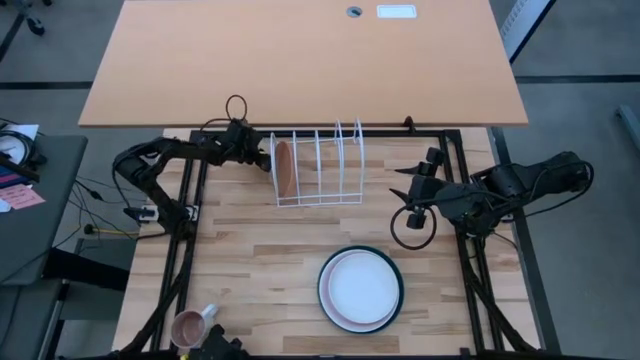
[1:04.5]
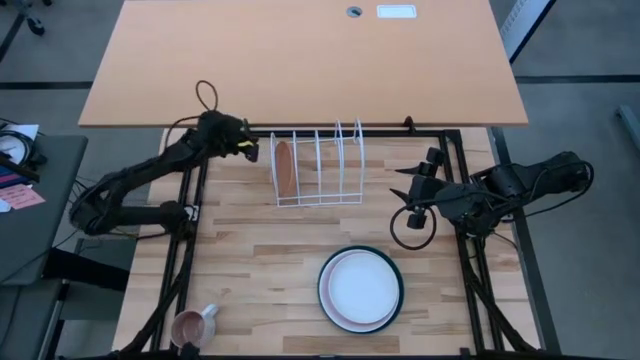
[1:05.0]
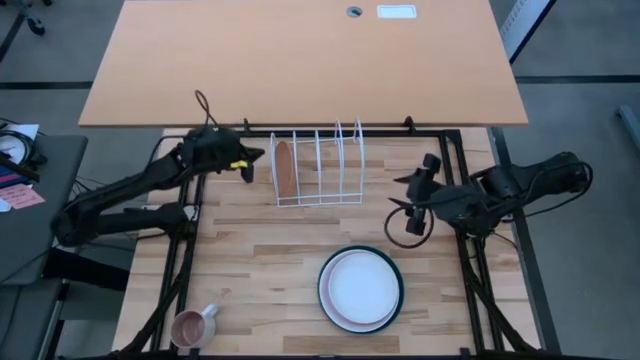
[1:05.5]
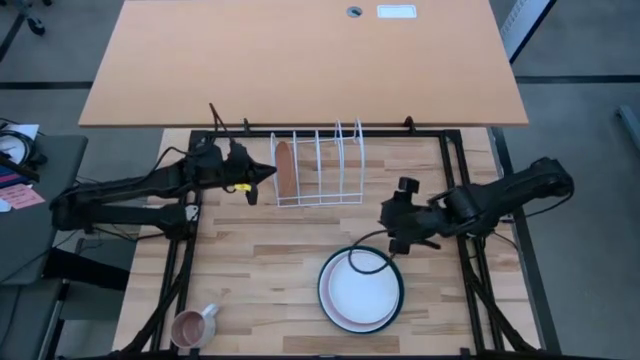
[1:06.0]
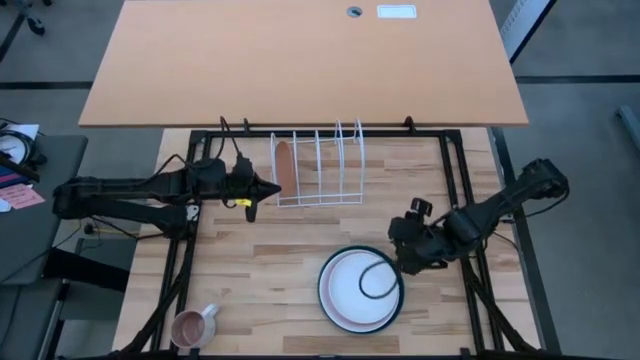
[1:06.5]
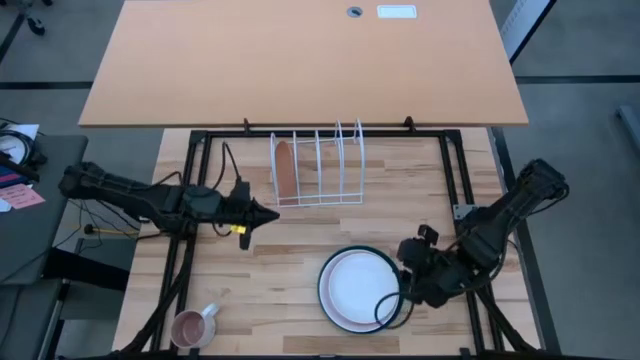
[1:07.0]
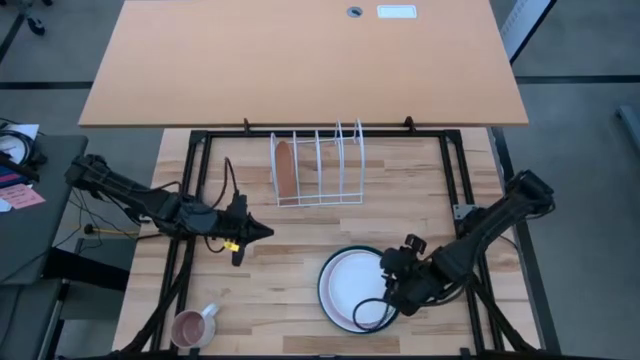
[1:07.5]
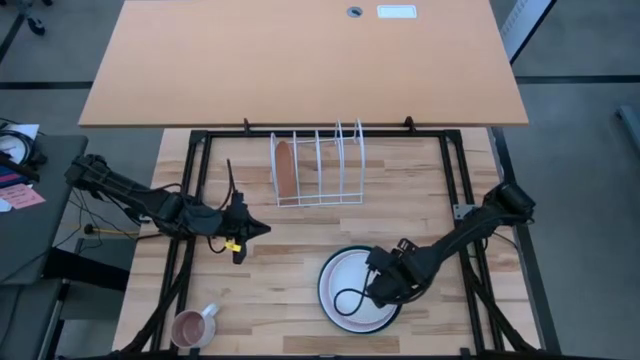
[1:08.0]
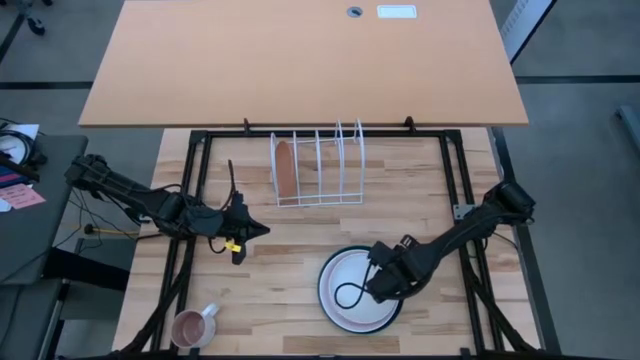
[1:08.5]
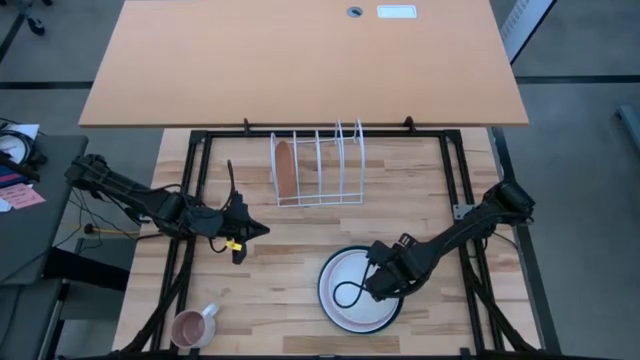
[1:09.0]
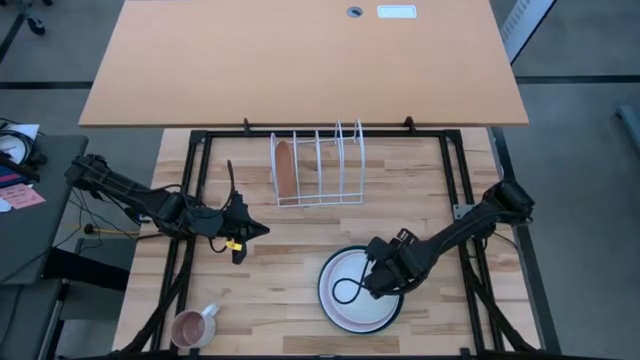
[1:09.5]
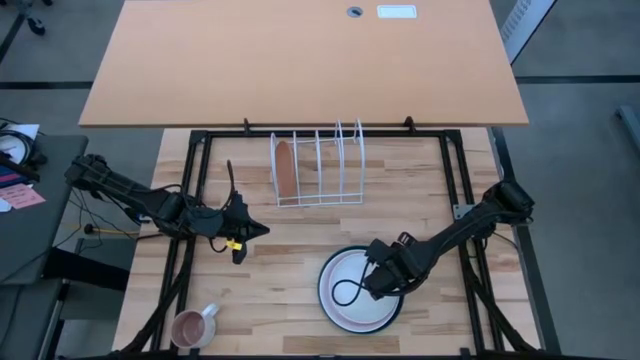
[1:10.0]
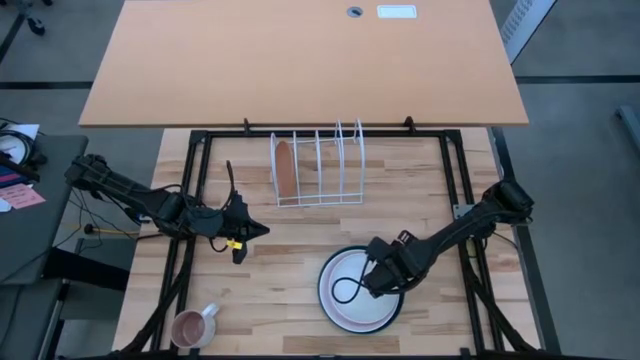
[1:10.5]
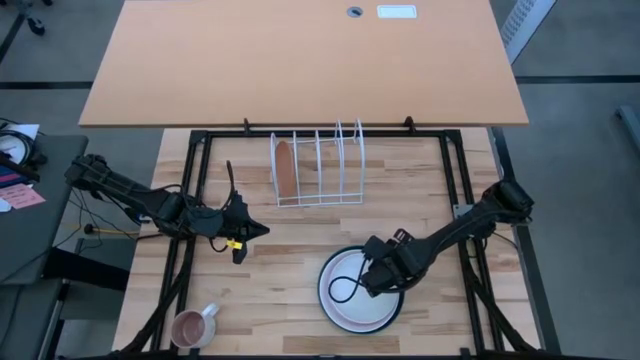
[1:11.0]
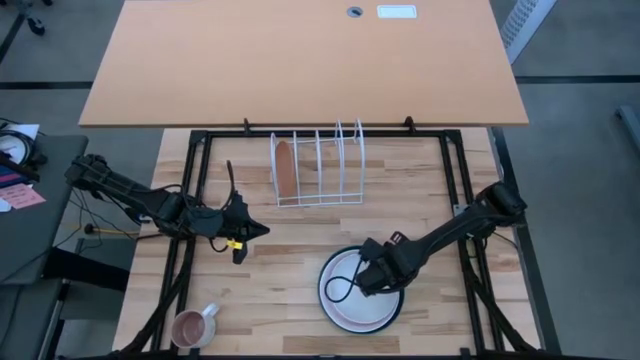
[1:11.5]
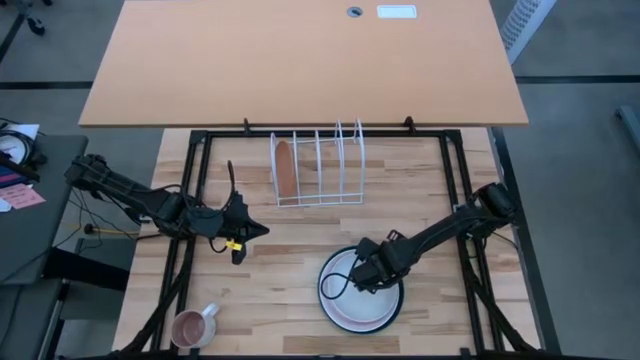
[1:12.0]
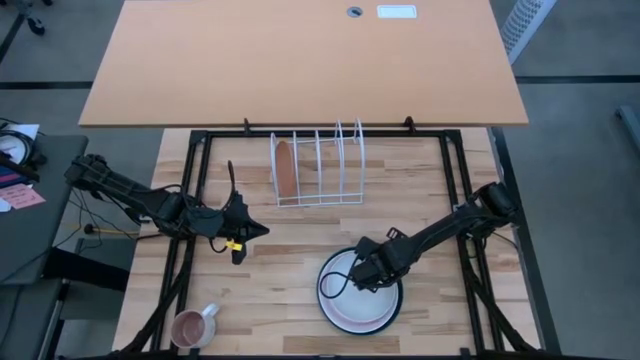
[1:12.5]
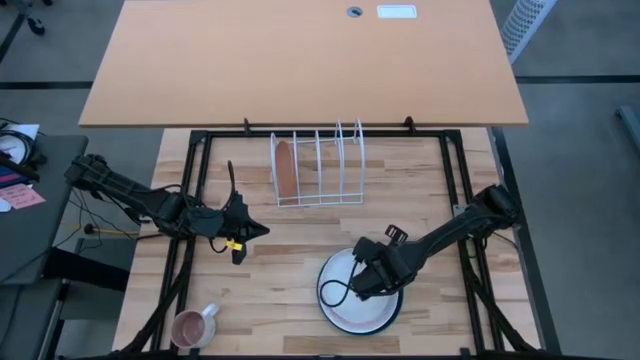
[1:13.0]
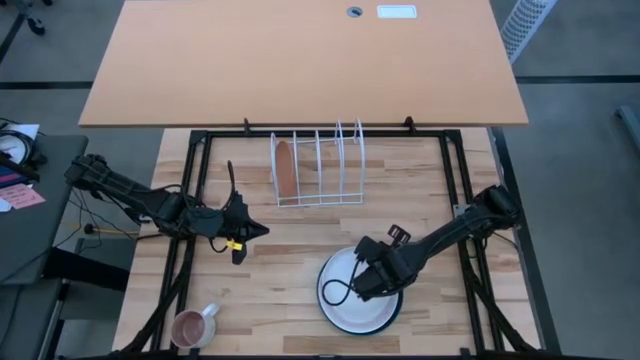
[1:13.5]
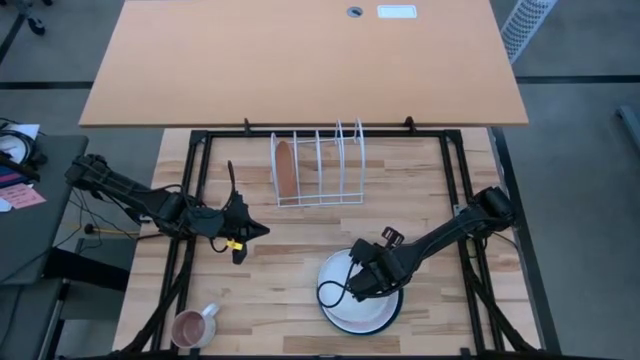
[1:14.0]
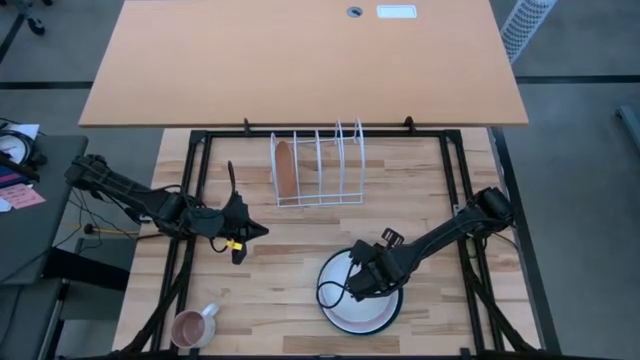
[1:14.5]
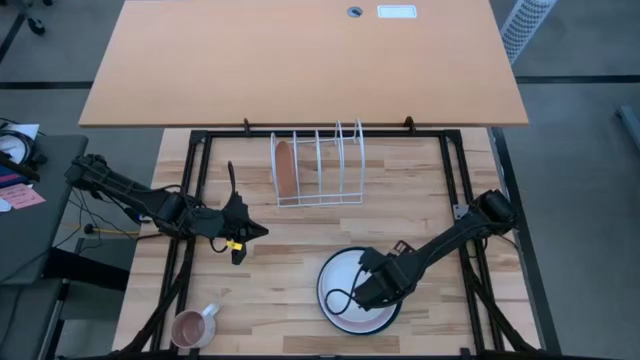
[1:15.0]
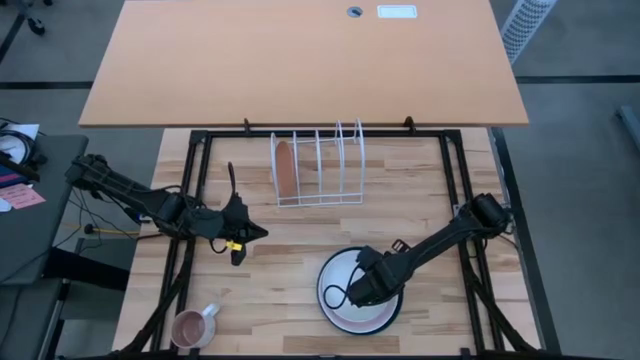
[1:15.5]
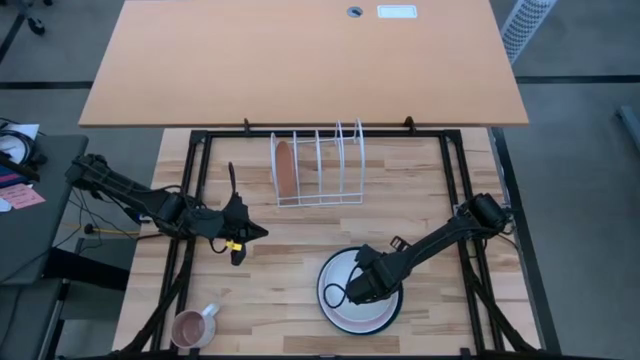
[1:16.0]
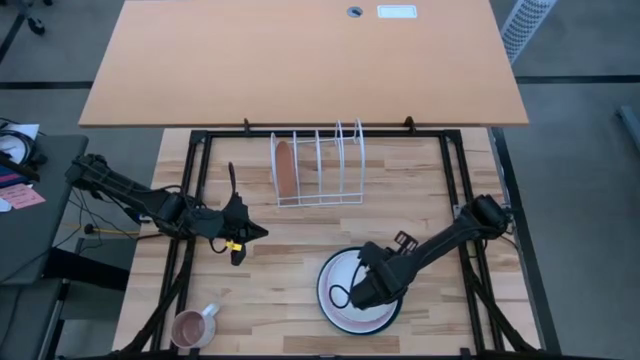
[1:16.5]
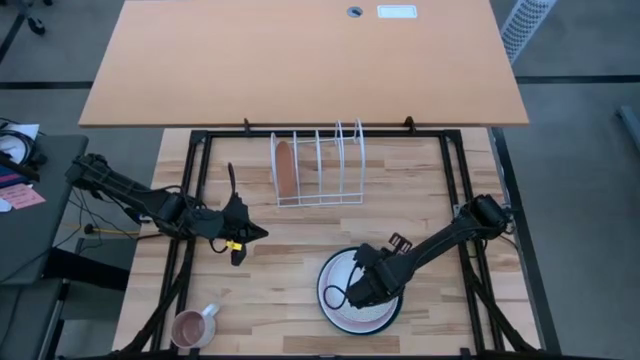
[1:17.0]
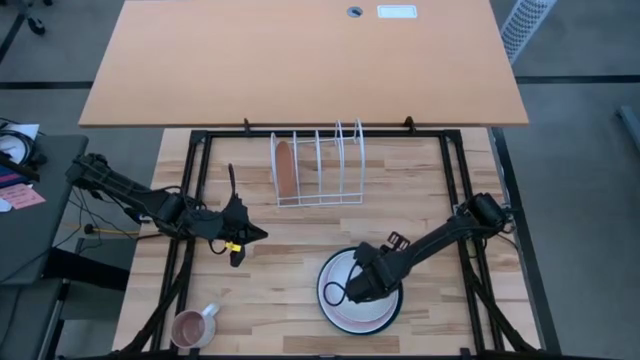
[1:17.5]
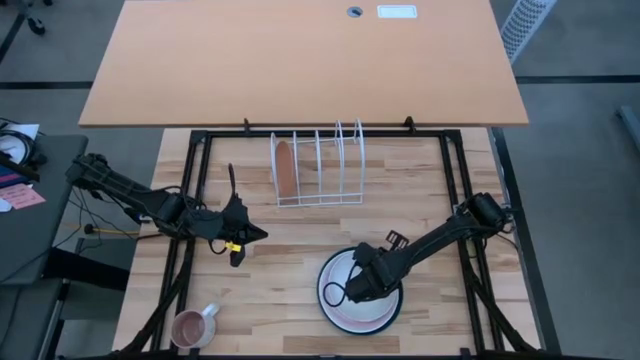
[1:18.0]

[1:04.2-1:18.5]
Task: Sort dishes
Put the small white plate in the dish rack

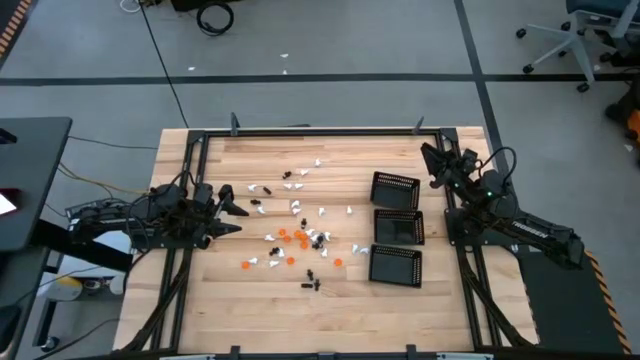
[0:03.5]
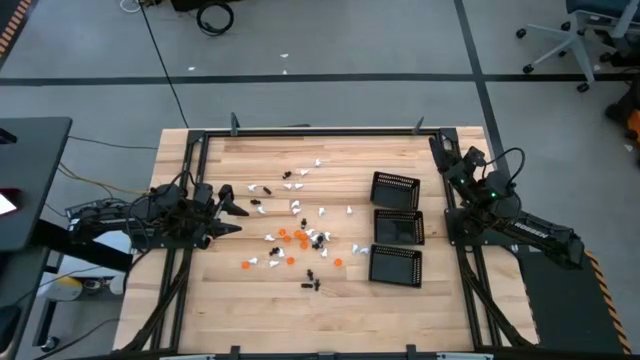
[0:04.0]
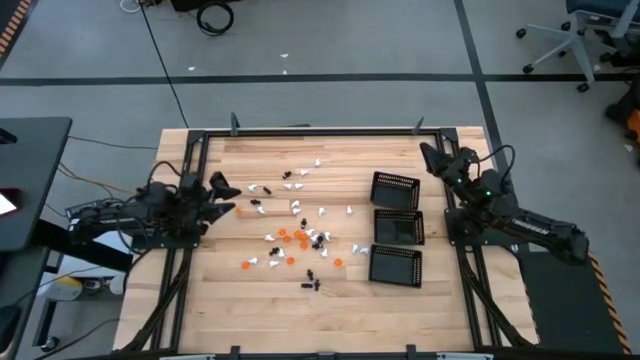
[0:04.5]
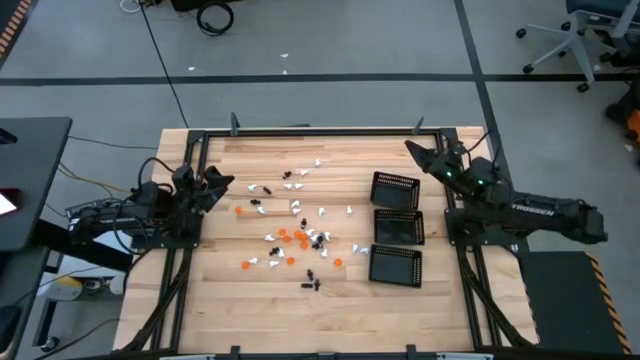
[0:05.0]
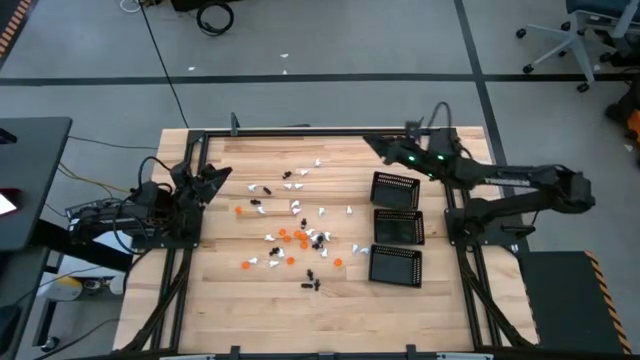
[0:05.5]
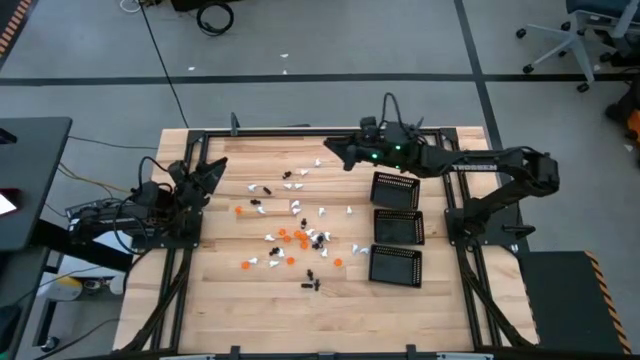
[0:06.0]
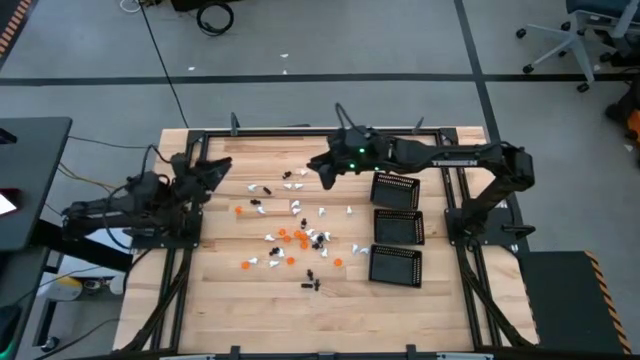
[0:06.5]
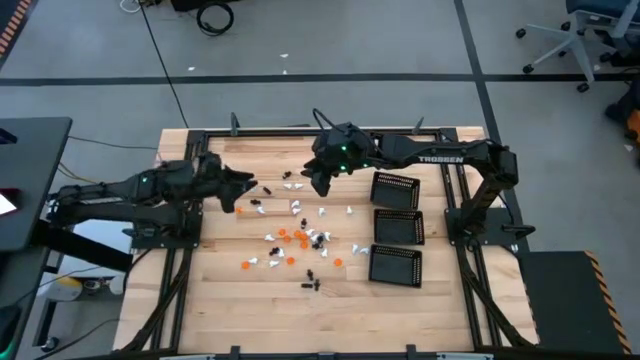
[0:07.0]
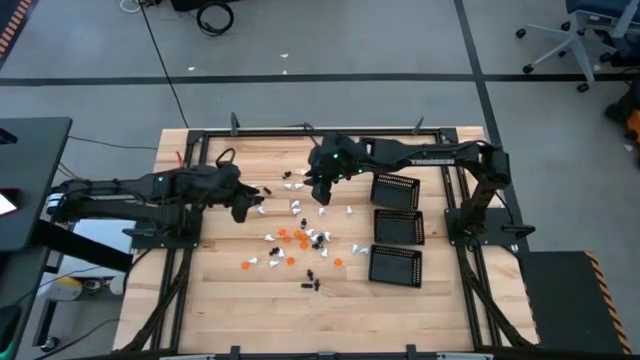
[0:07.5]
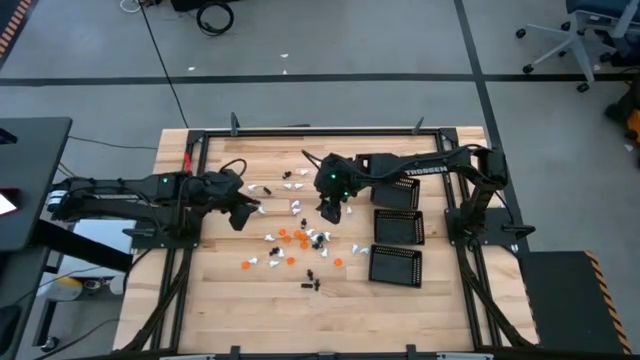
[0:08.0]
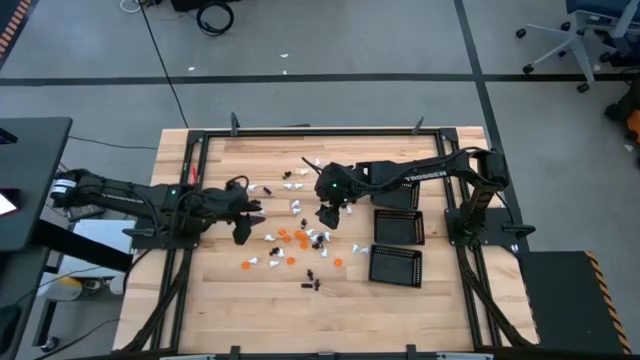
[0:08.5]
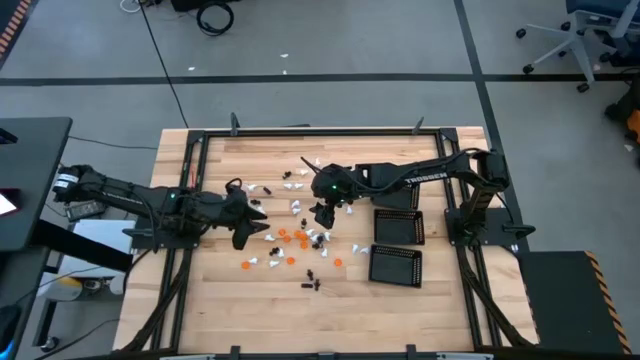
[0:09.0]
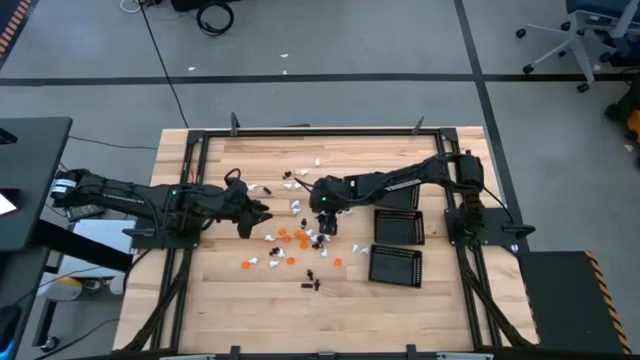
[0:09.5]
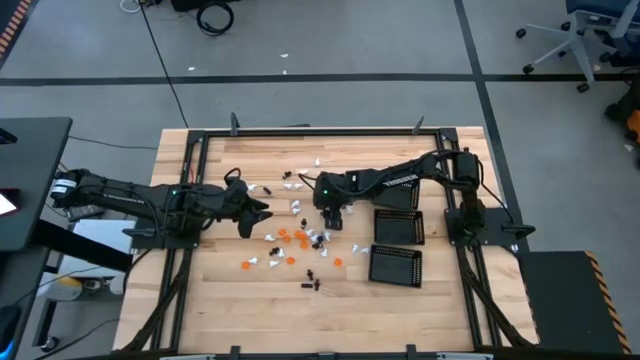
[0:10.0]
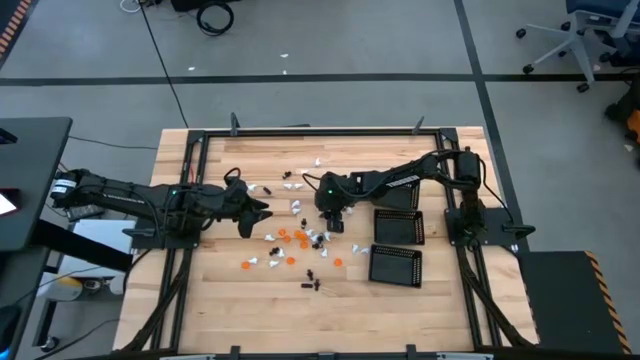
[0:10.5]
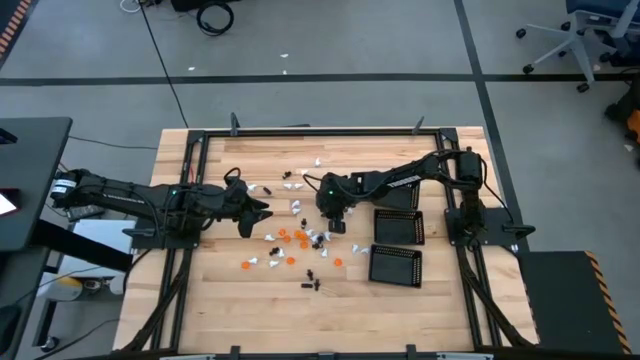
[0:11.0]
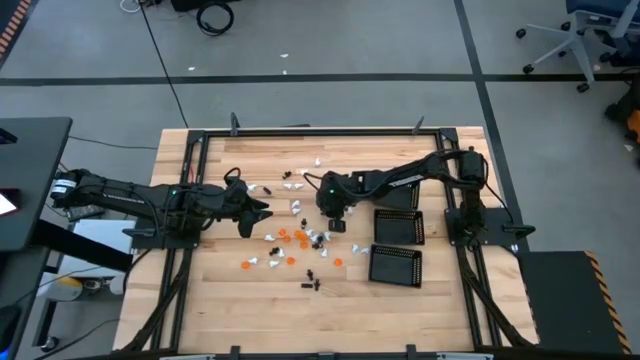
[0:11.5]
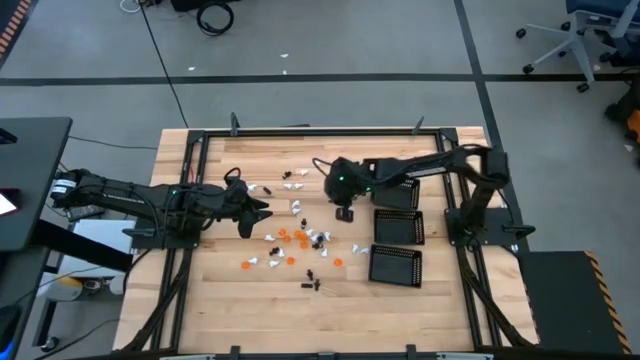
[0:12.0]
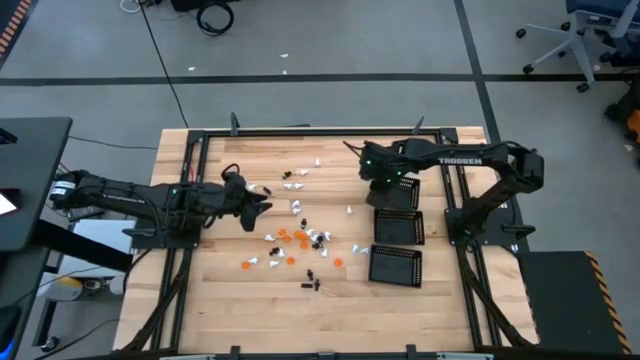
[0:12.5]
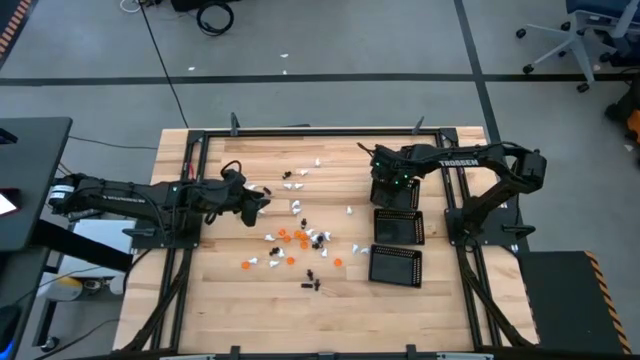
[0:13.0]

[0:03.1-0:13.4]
Task: Sort Halloween decoration
Put the white ghost toy into the top black bin
